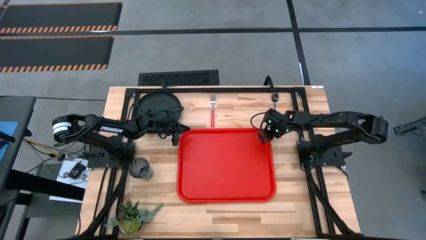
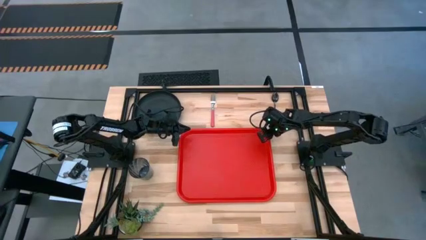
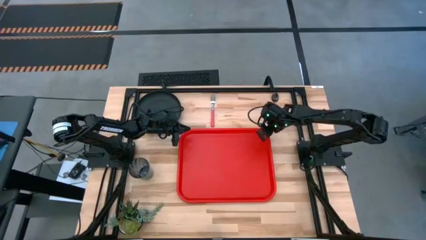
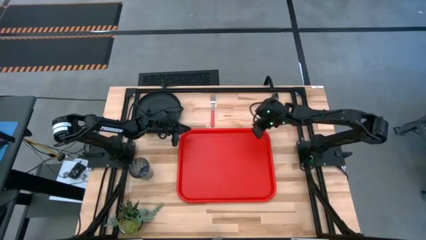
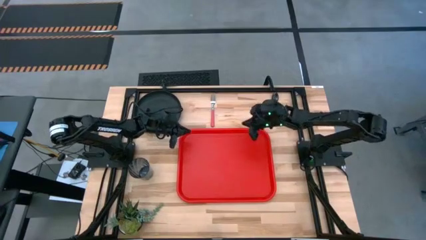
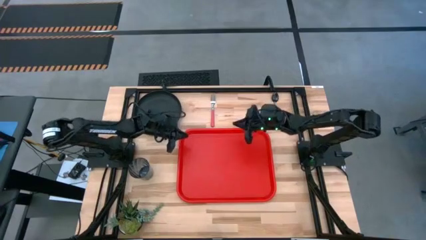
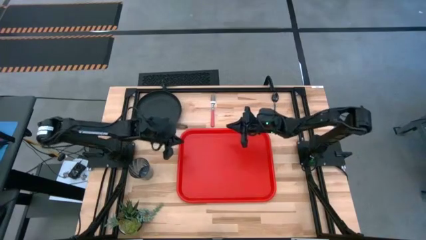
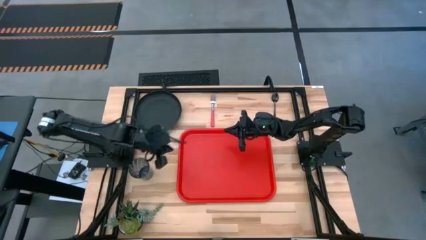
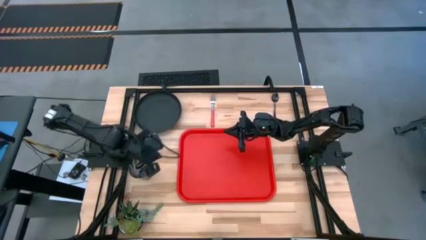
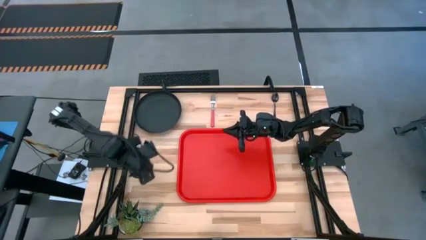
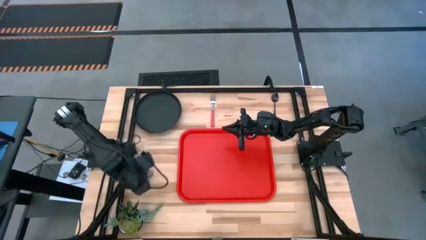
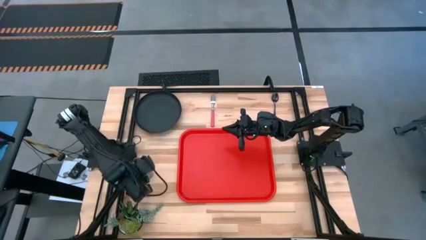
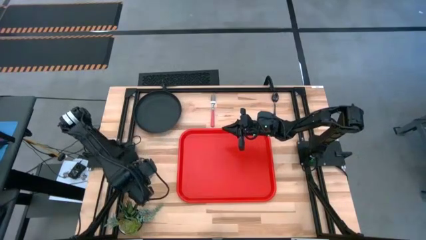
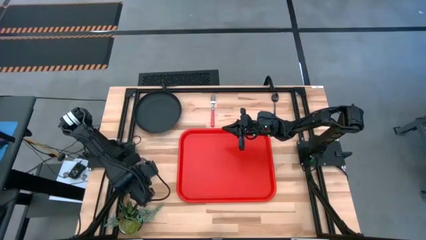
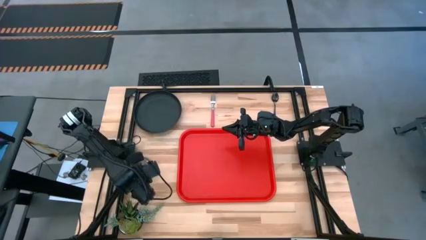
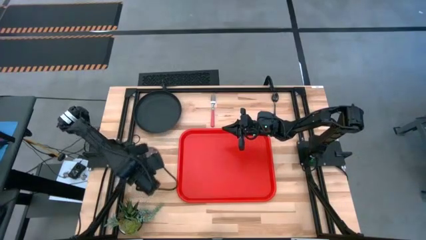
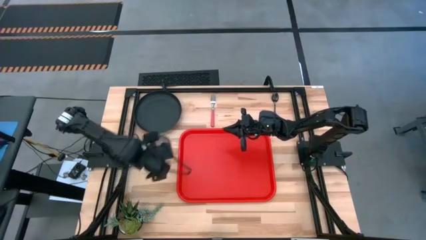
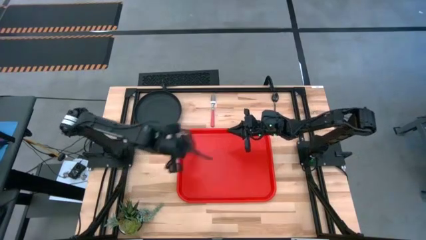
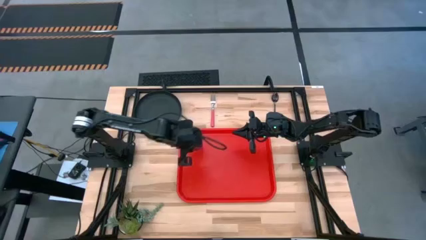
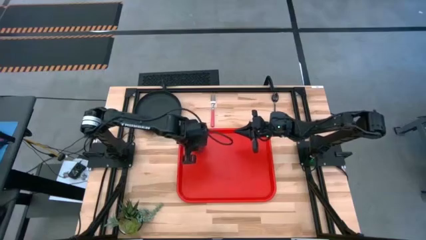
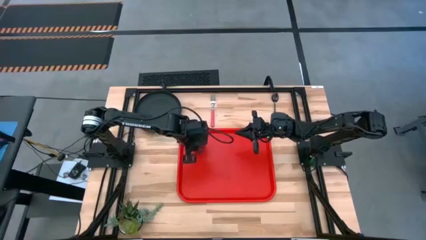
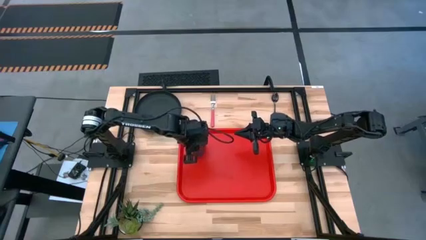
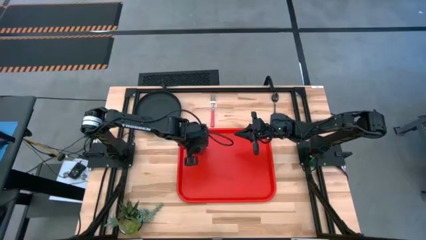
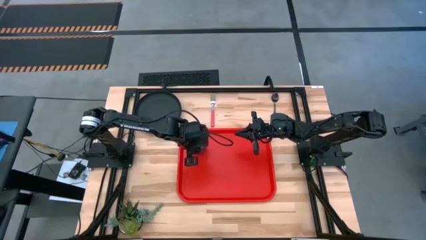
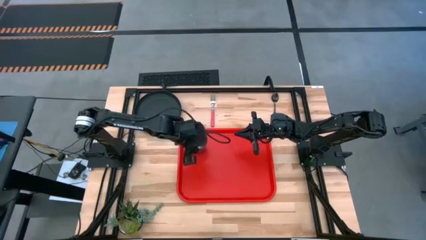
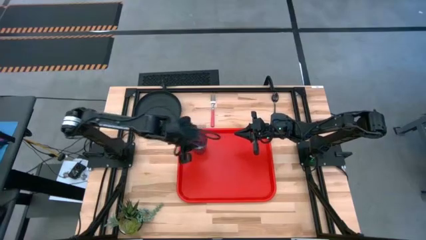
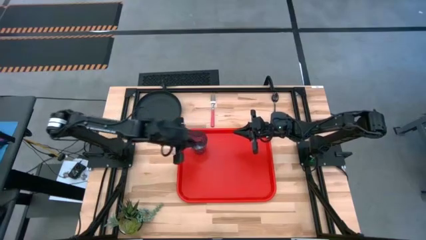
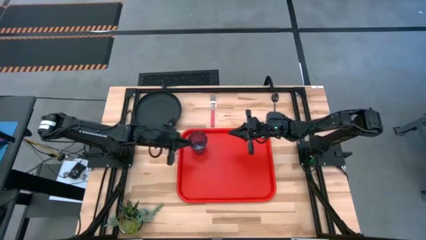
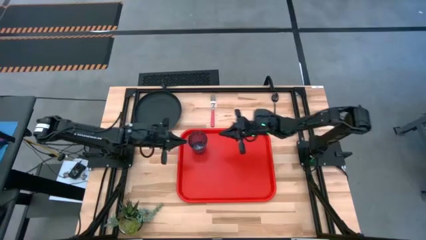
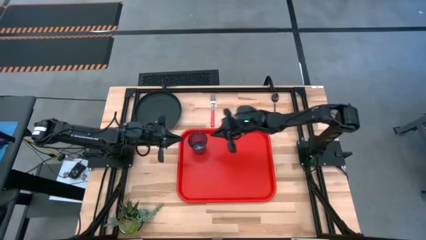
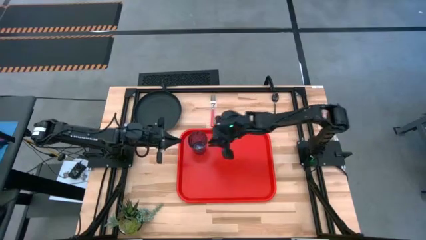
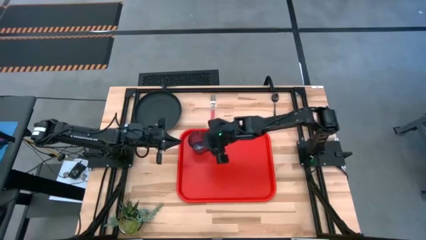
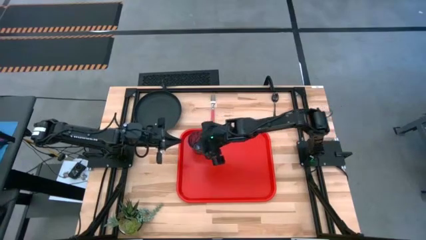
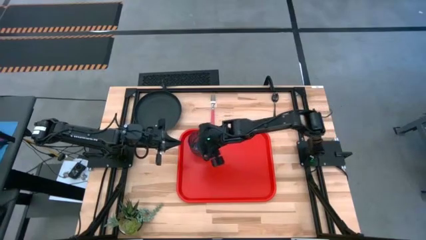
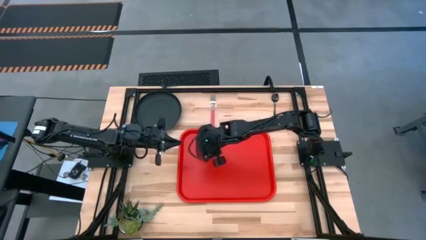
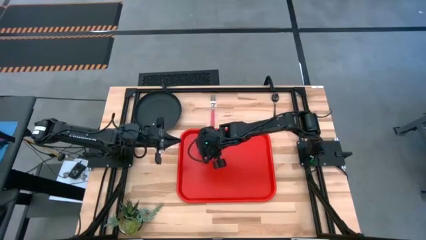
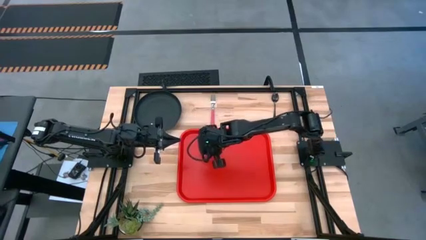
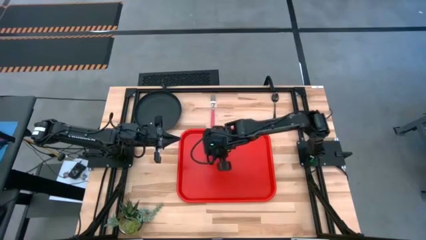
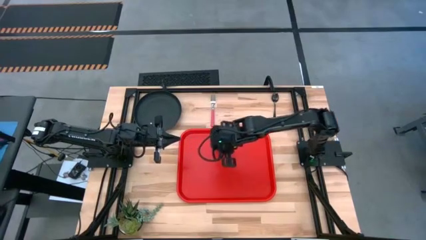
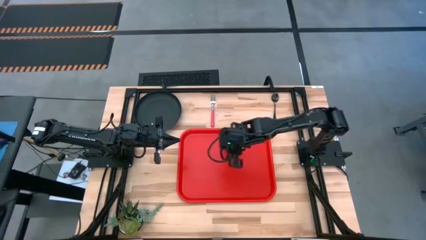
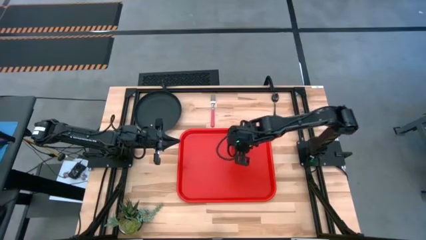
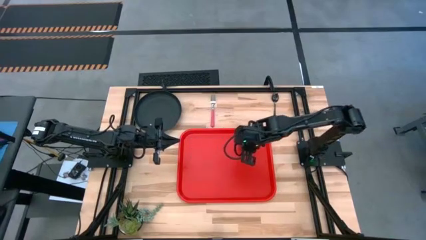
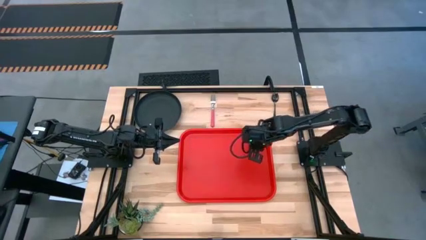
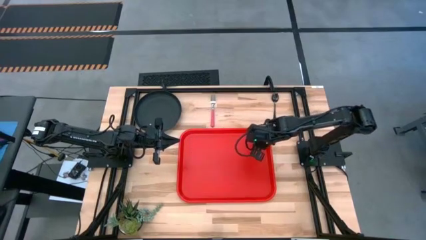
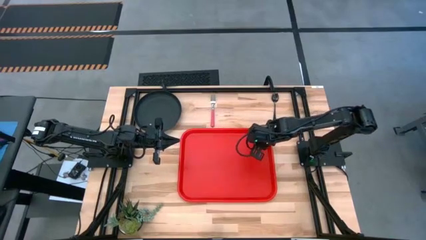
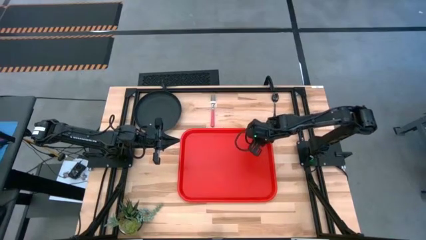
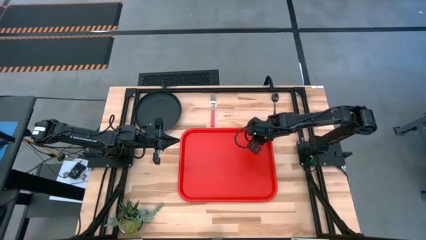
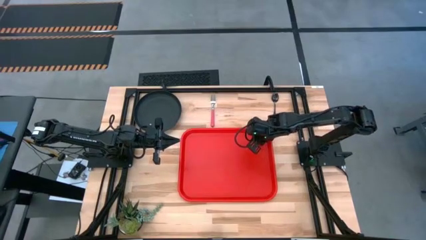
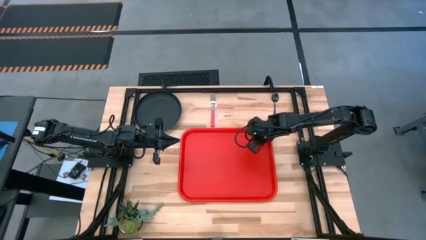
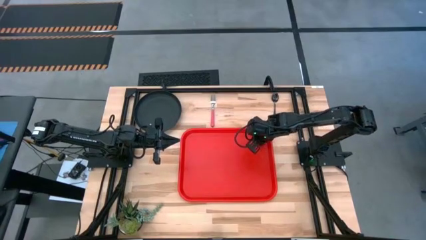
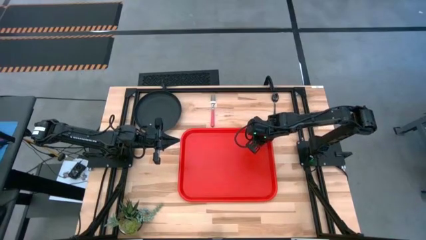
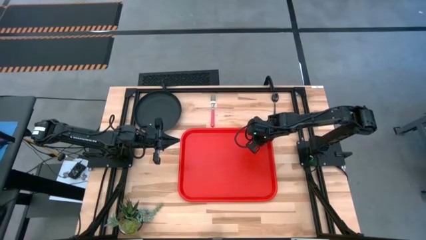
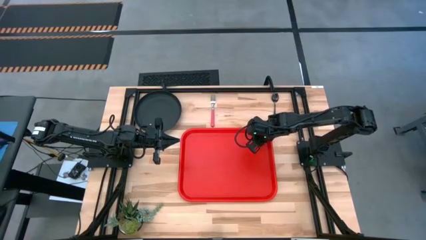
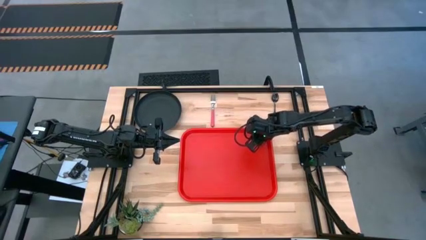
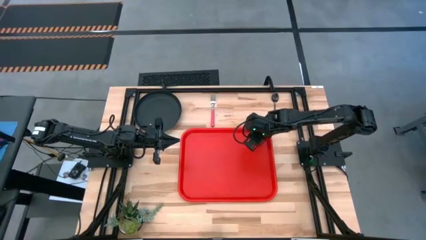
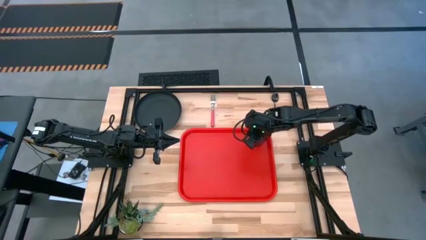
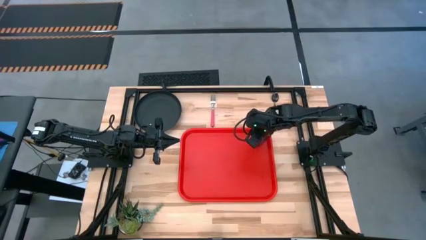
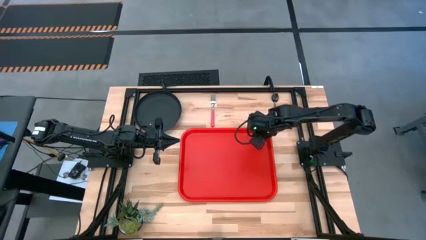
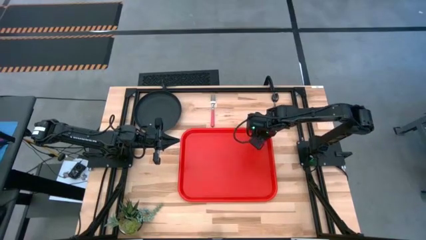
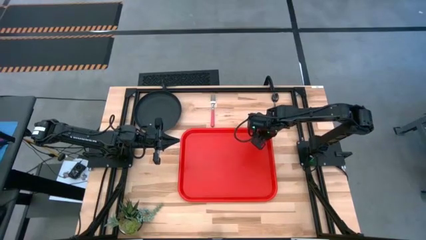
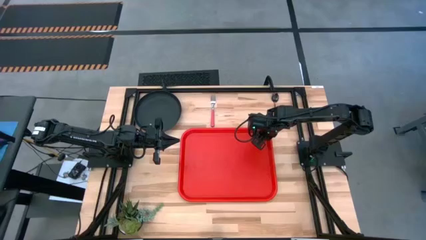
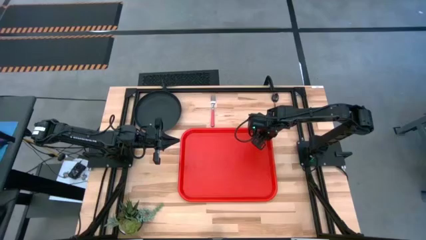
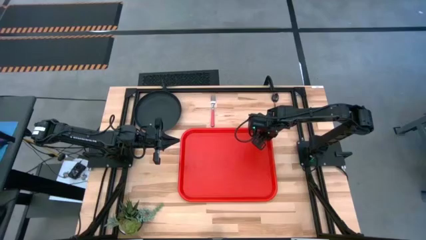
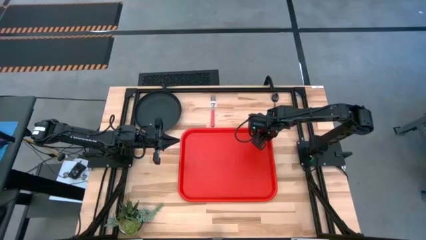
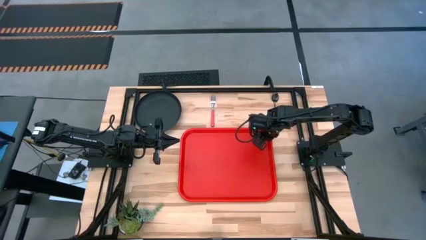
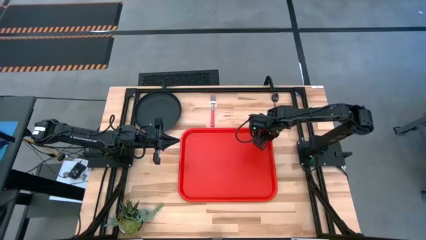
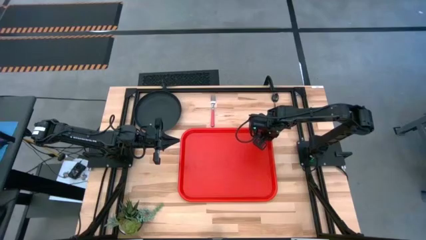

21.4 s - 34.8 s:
Task: Pick and place plate/cup/fork/spoon on tray
Put the blue glass to the top right of the red serving tray
